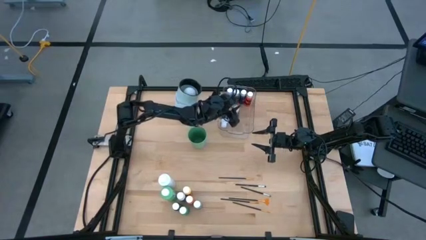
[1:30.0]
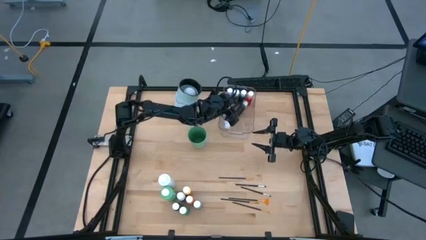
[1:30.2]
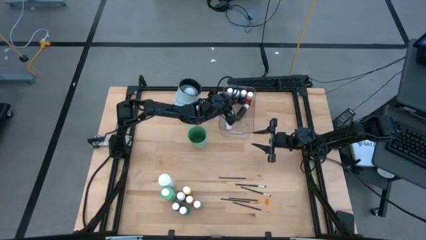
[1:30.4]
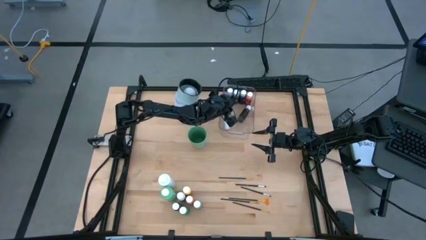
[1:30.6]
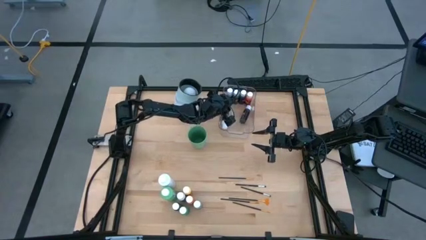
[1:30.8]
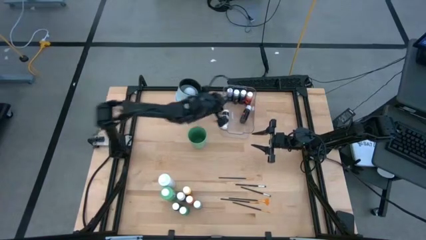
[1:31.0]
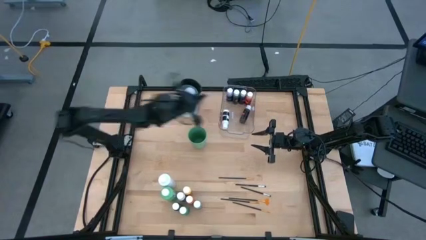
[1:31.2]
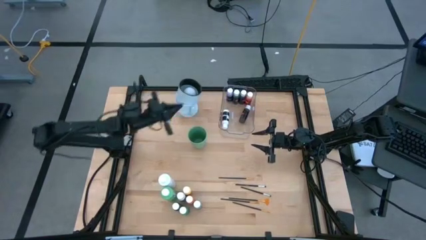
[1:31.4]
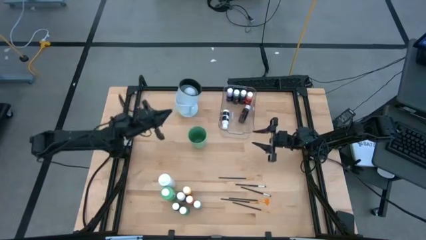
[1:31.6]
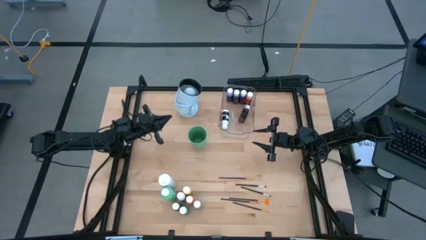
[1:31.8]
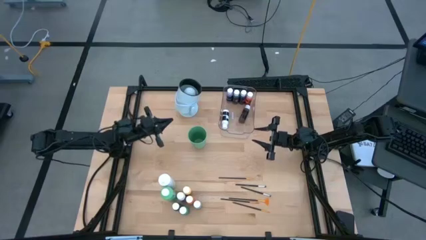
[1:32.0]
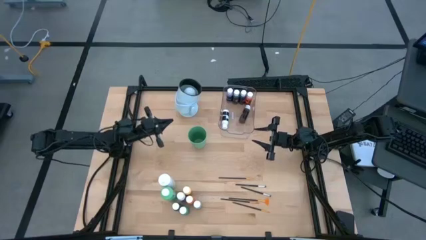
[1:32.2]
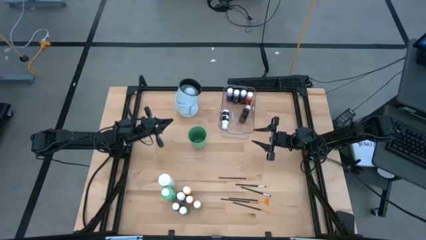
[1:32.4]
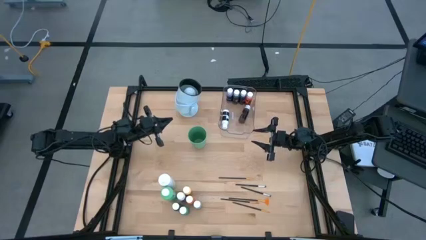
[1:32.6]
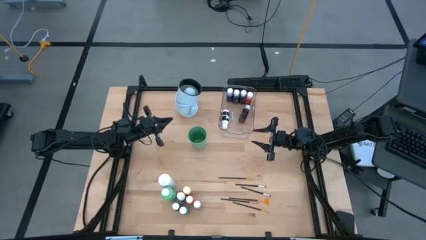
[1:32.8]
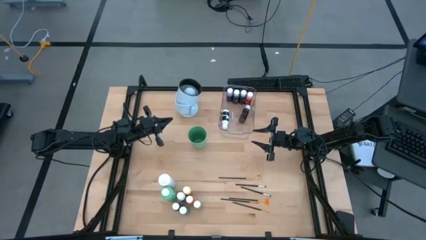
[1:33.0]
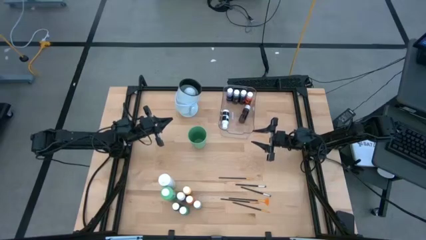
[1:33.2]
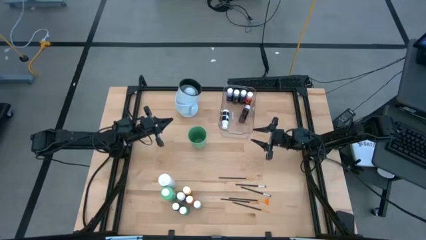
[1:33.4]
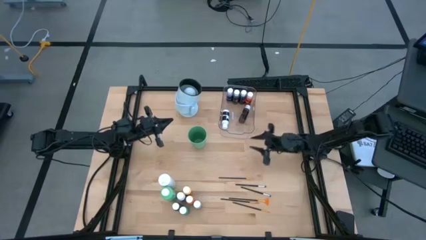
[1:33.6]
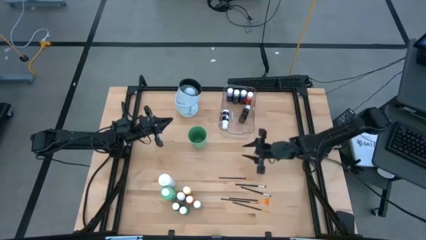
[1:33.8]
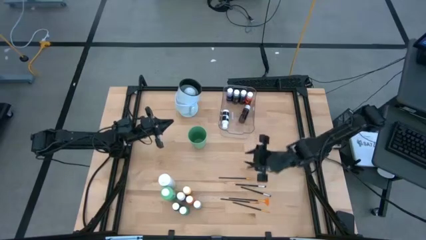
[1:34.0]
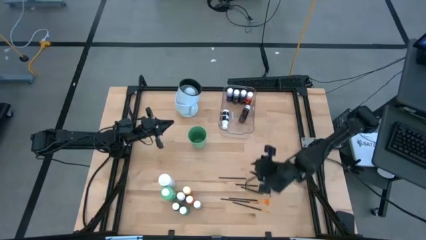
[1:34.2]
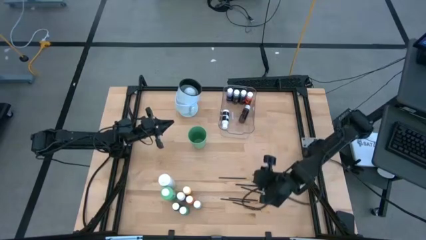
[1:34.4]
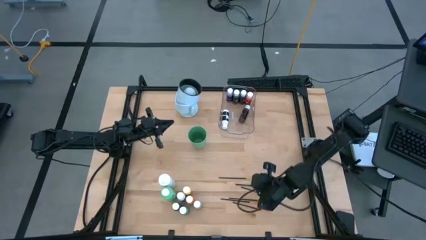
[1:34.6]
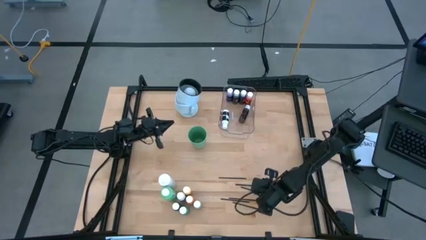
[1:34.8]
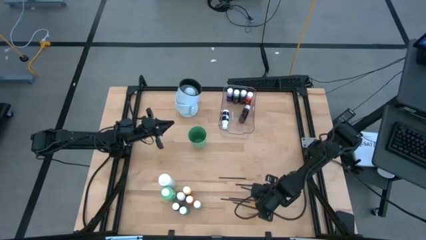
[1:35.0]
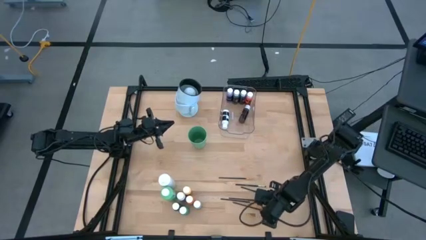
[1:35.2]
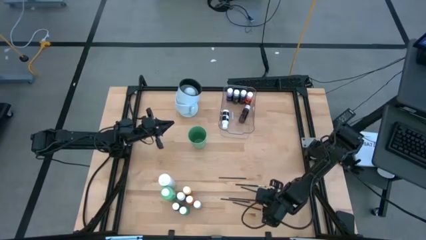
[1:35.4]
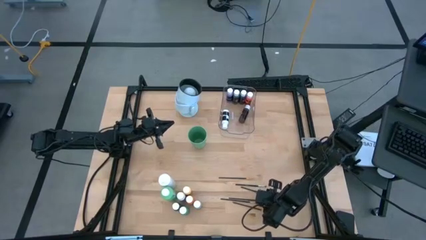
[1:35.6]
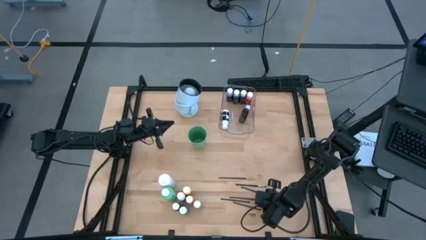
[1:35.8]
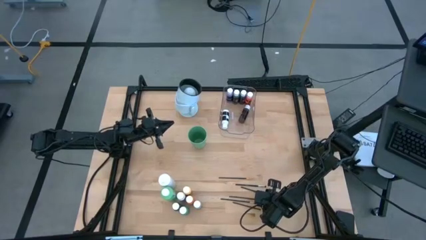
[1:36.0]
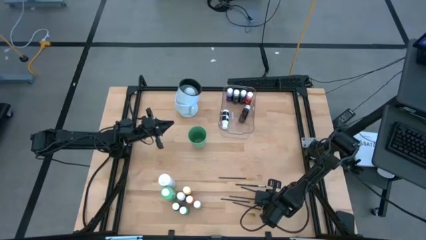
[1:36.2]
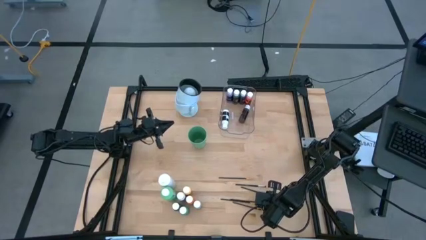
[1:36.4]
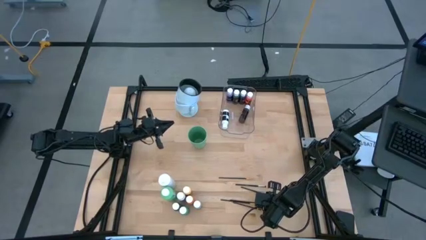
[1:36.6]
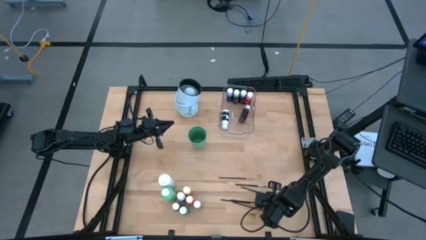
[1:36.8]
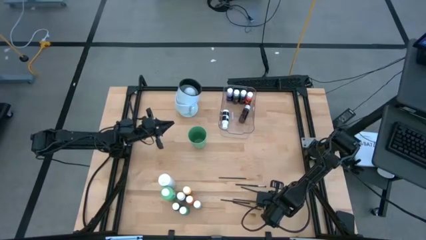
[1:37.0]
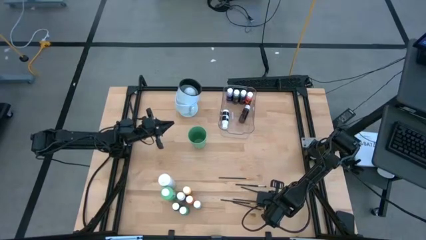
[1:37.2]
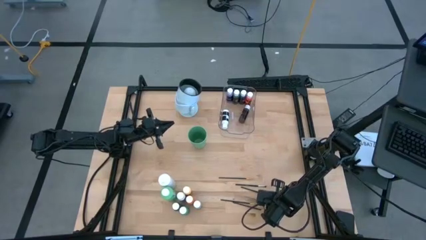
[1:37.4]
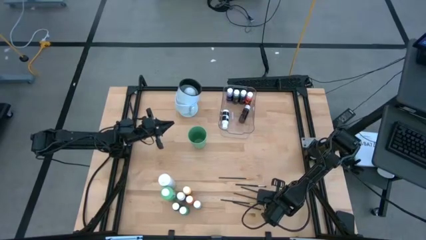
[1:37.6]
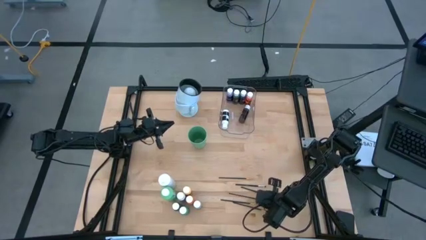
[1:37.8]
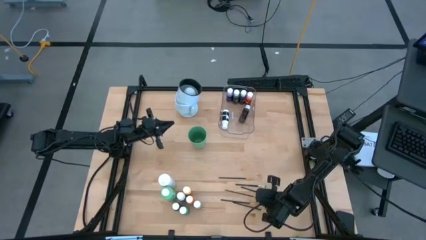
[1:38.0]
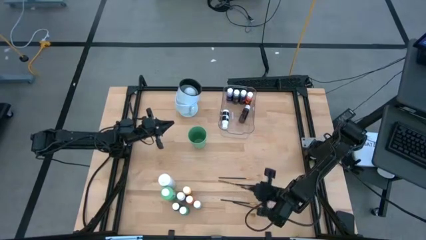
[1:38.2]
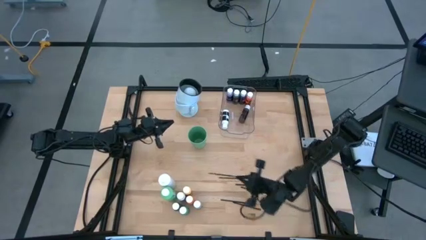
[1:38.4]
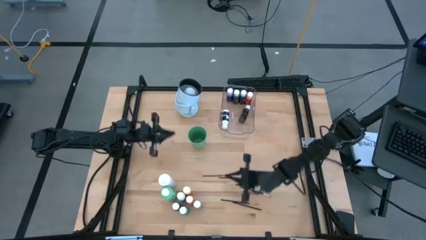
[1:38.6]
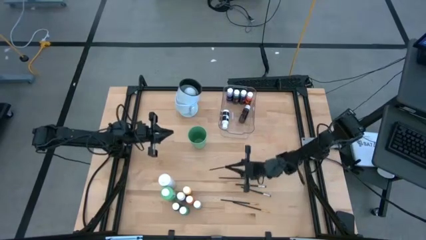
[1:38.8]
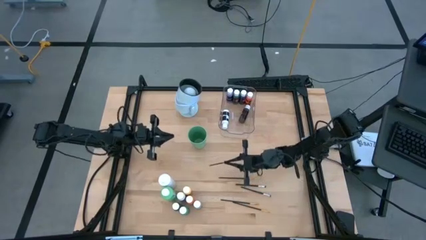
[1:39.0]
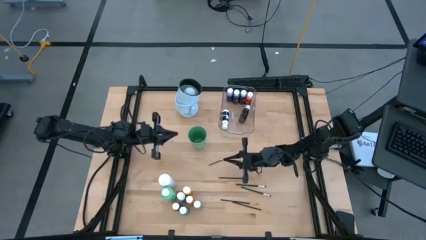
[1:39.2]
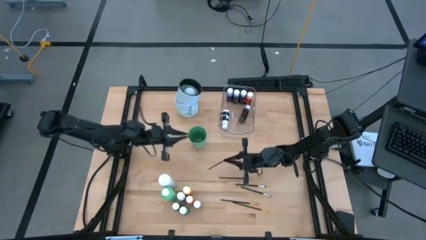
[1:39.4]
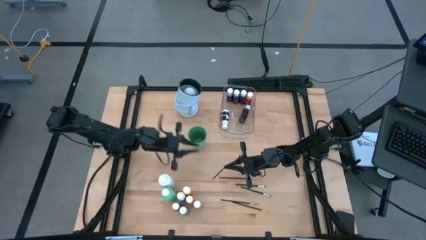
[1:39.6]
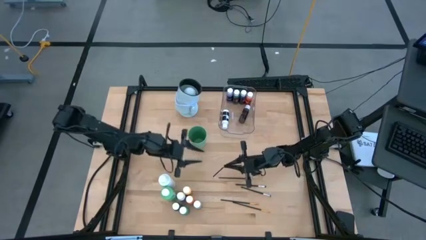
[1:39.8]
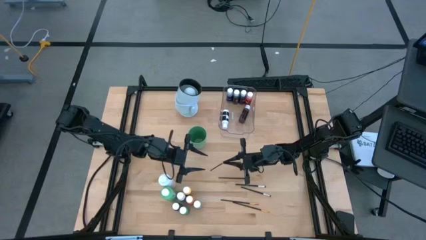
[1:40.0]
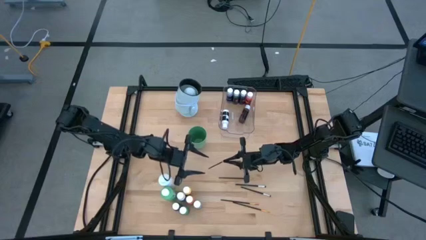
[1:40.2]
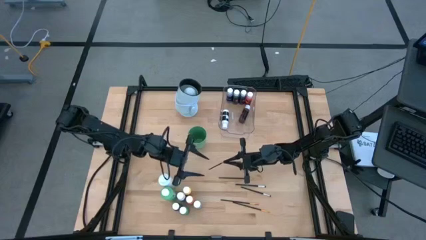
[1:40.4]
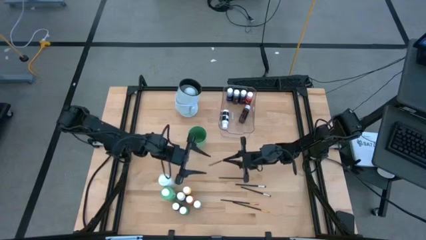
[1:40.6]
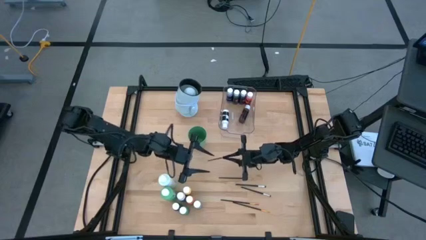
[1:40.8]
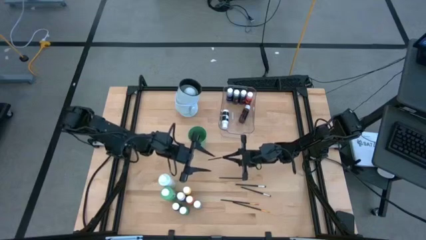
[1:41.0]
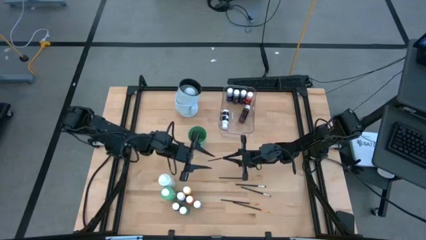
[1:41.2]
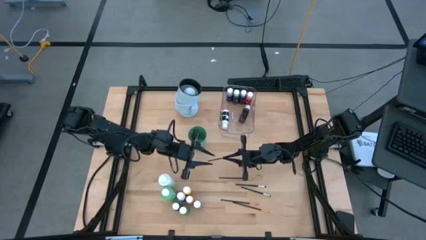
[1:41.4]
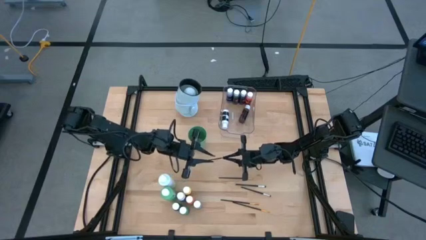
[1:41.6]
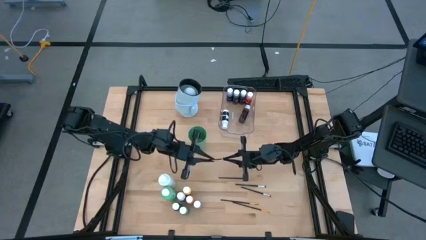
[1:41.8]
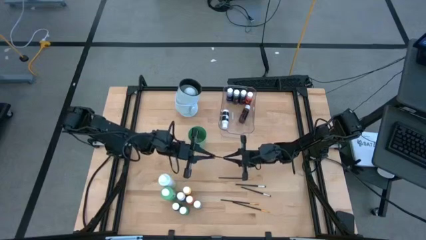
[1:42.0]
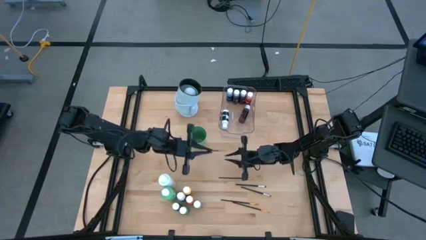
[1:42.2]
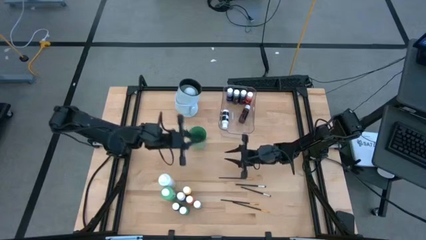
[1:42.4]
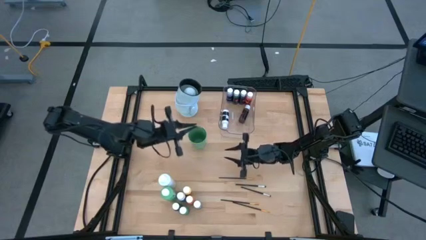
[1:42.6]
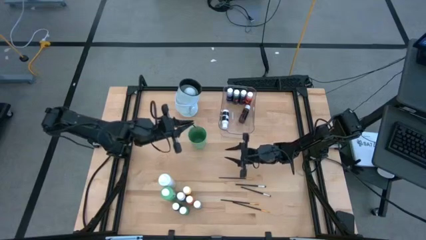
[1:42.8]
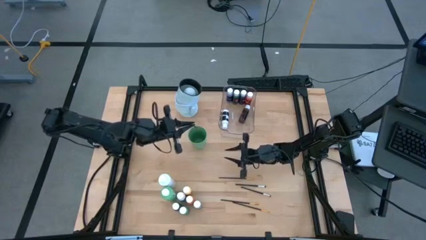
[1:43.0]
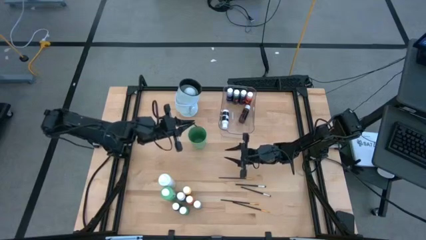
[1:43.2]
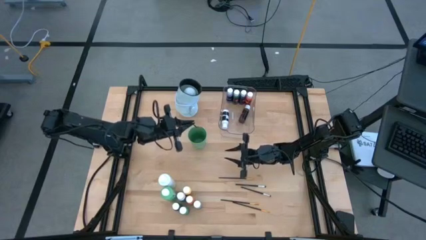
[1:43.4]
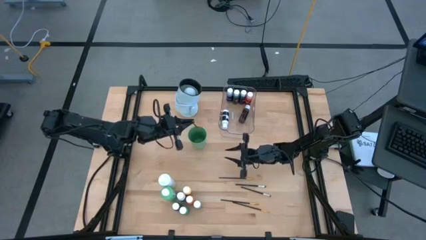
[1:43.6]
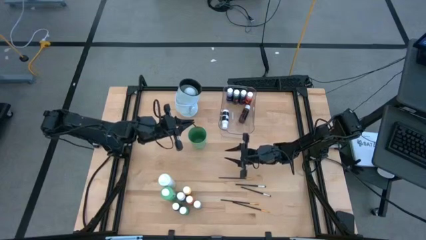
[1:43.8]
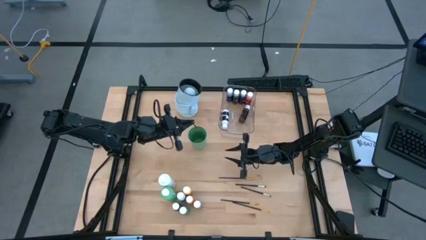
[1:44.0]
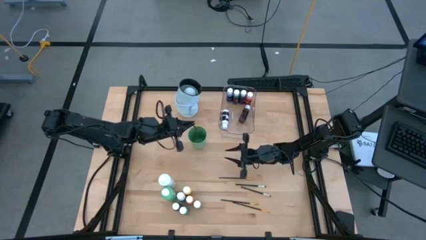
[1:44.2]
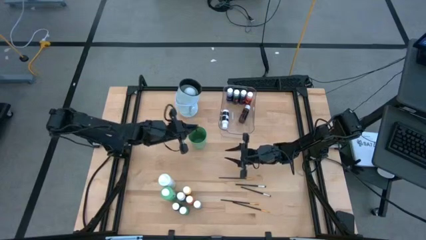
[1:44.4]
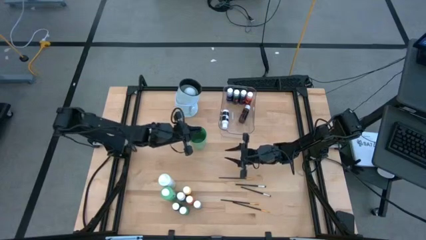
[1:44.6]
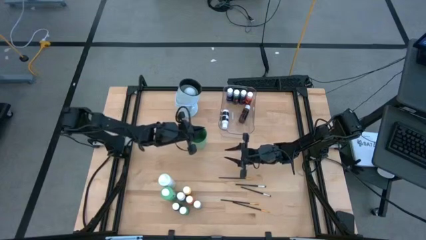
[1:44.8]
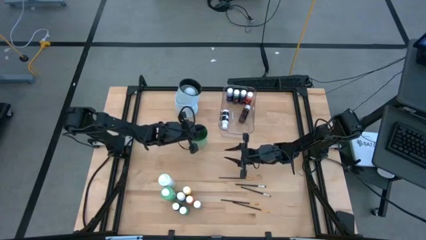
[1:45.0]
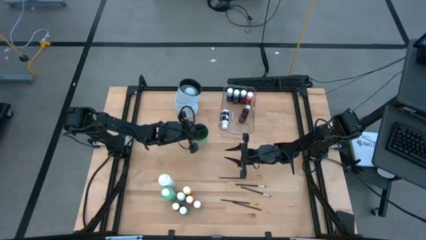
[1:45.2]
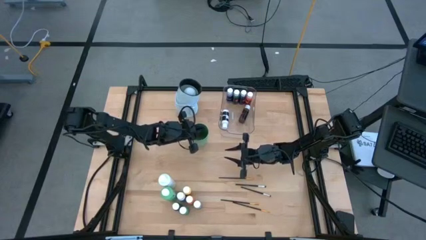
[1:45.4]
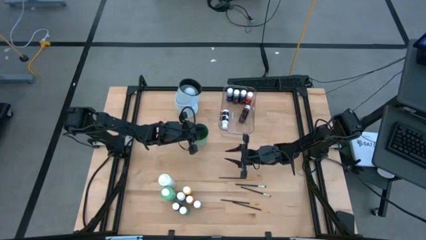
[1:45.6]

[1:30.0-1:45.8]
Task: Pick & Place Paint Supplies
Put the gold paintbrush into the green cup
